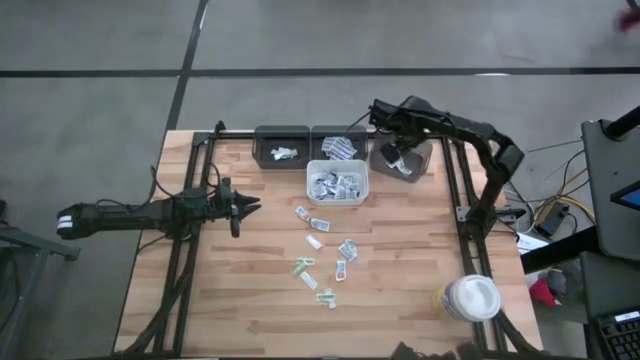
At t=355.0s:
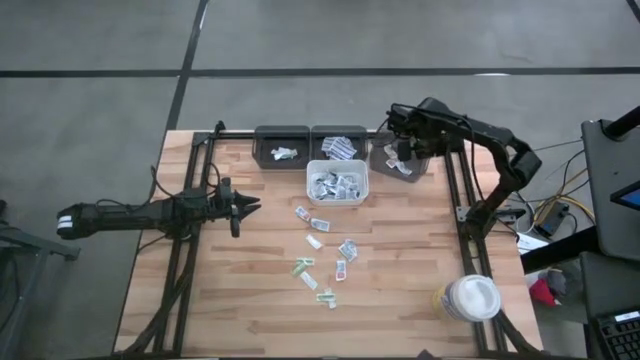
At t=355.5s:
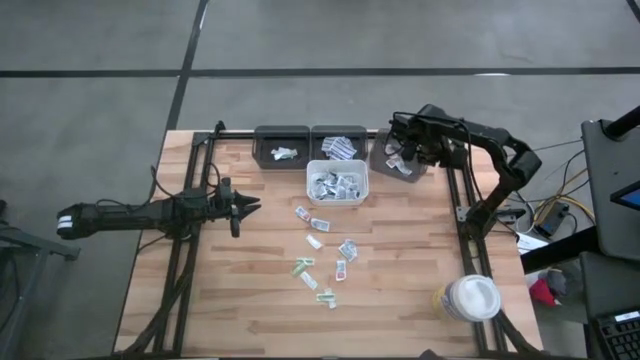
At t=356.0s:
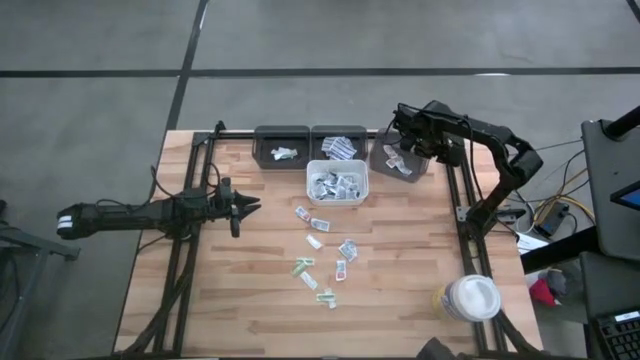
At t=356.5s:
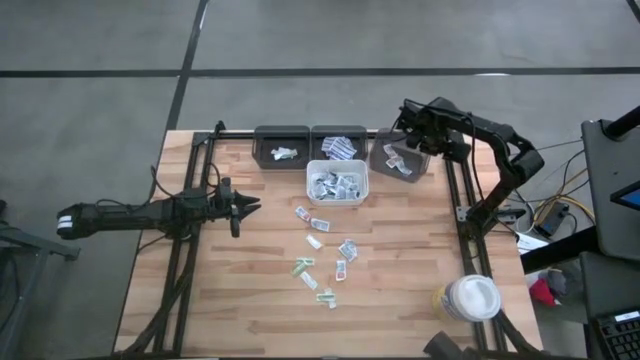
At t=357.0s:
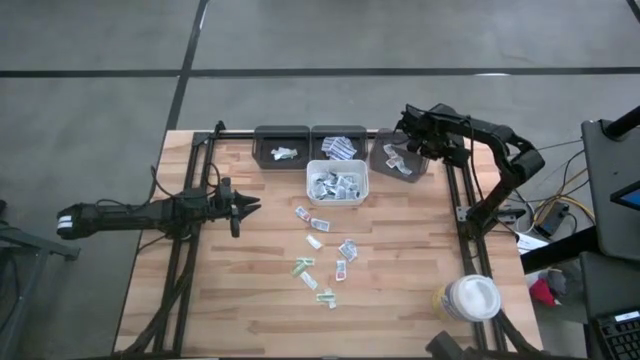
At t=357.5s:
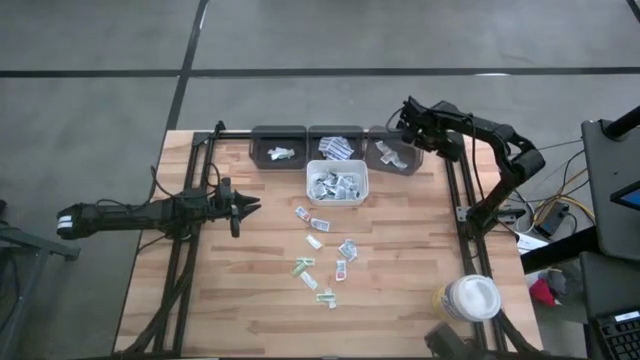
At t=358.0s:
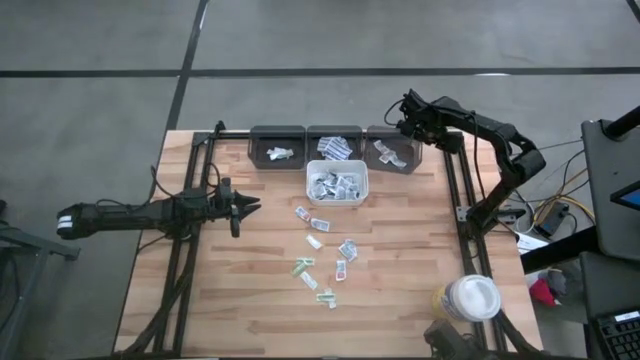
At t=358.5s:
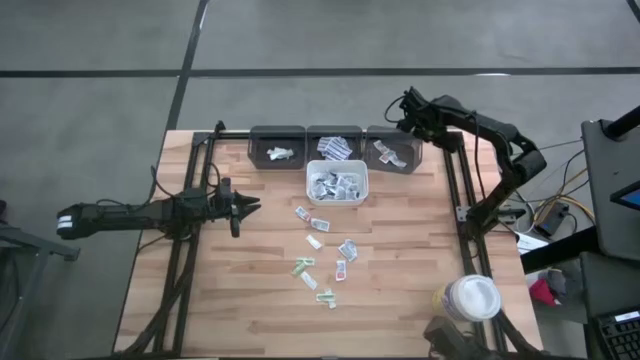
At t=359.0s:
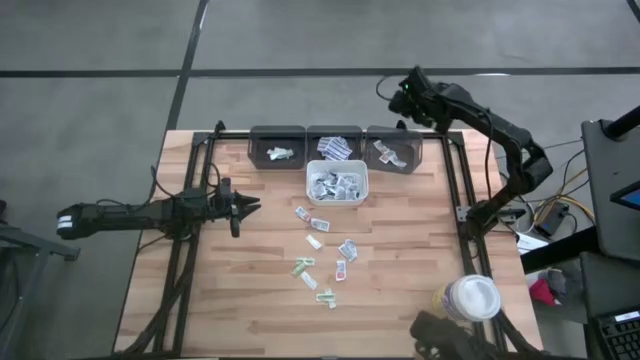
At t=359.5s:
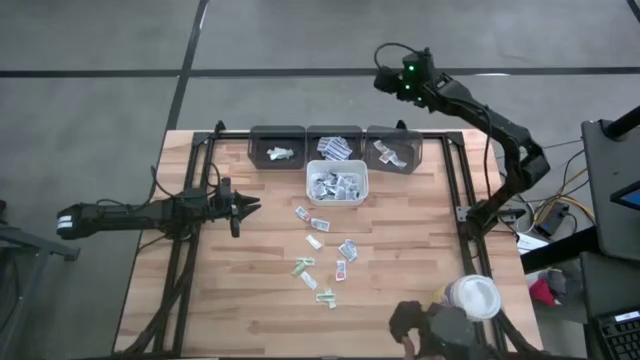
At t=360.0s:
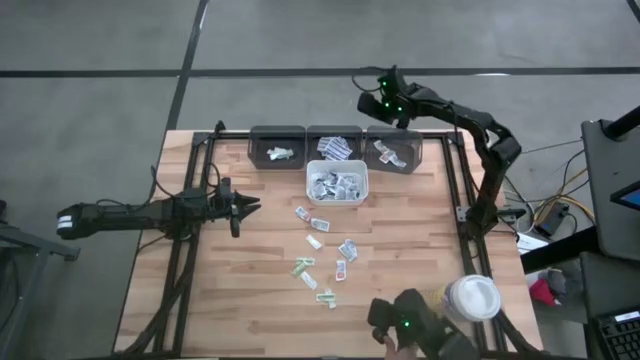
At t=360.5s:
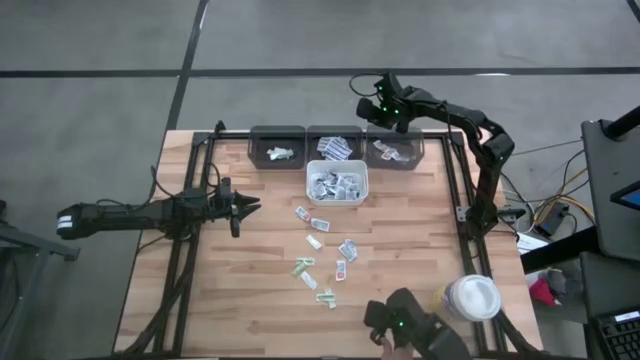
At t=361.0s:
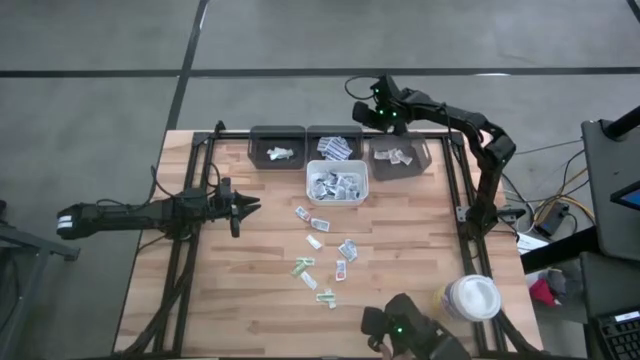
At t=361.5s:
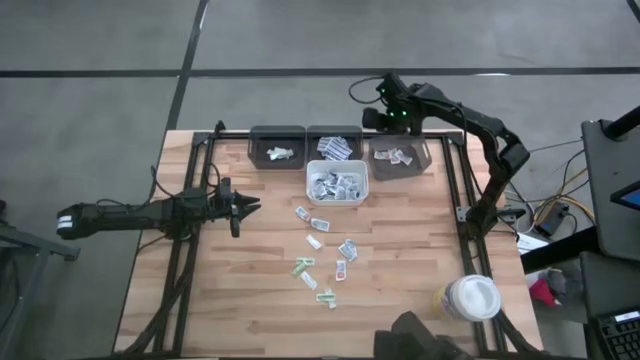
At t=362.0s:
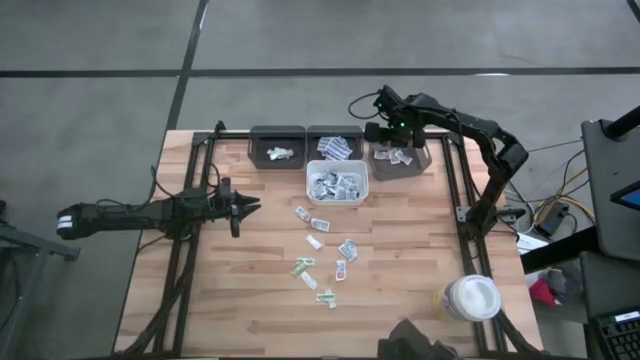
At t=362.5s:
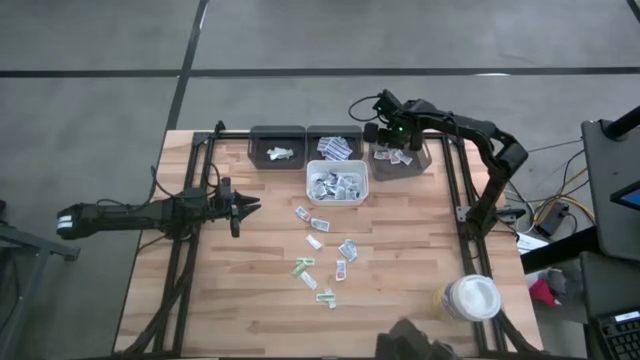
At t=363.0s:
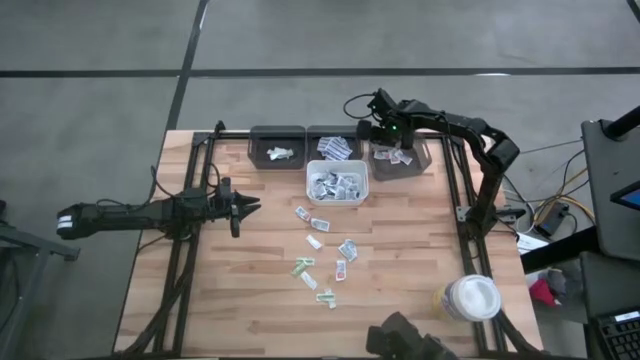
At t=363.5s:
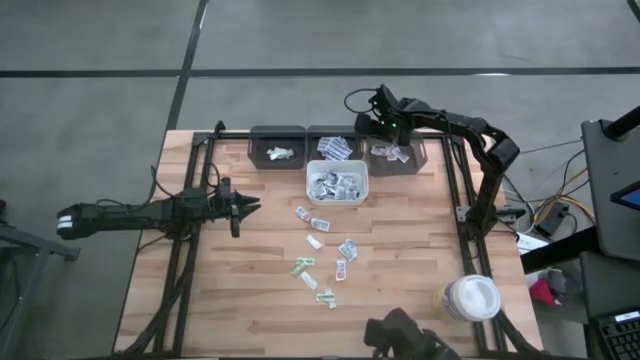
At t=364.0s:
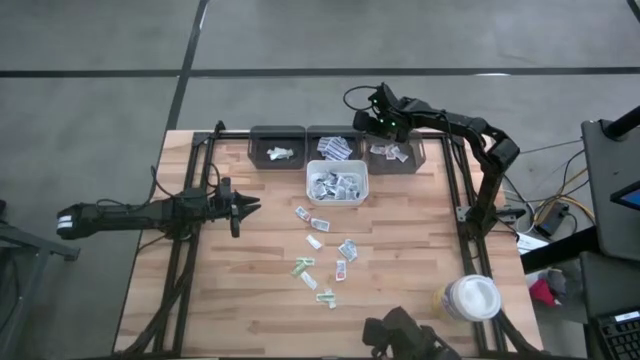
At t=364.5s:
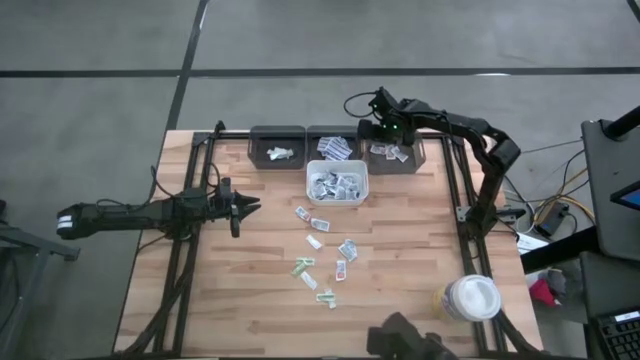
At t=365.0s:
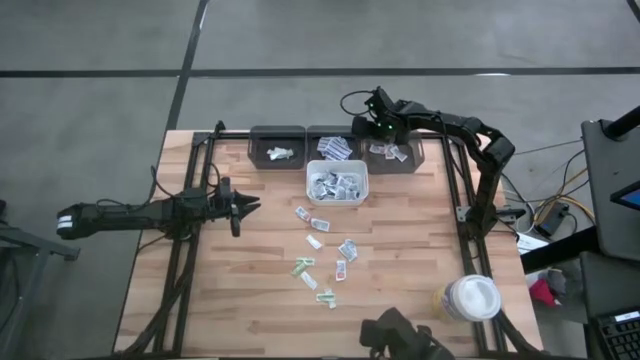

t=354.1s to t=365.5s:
Task: Pick & Place First Aid Supplies
Adjust the right black bin on the table

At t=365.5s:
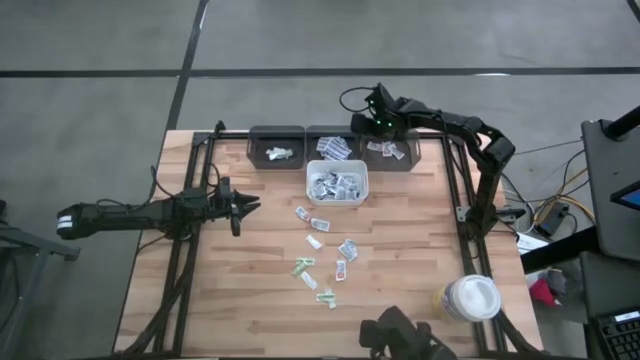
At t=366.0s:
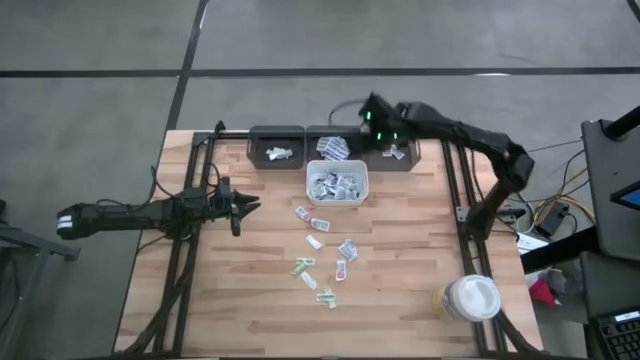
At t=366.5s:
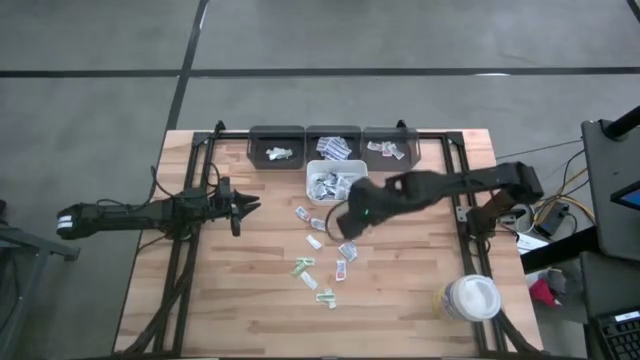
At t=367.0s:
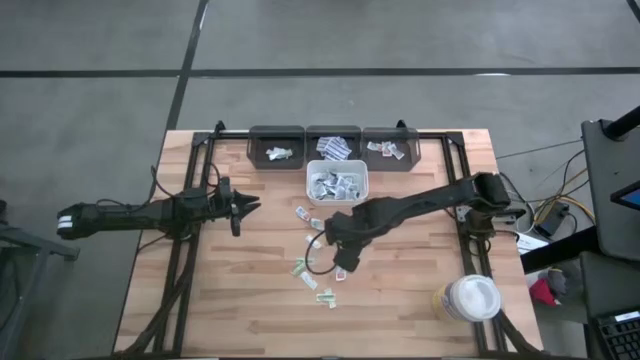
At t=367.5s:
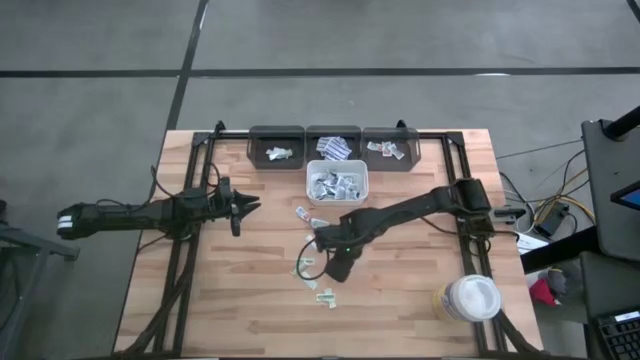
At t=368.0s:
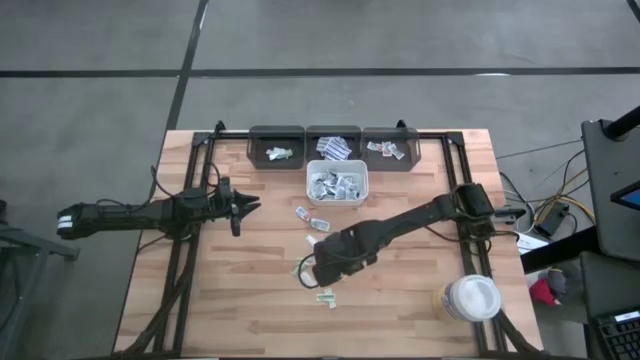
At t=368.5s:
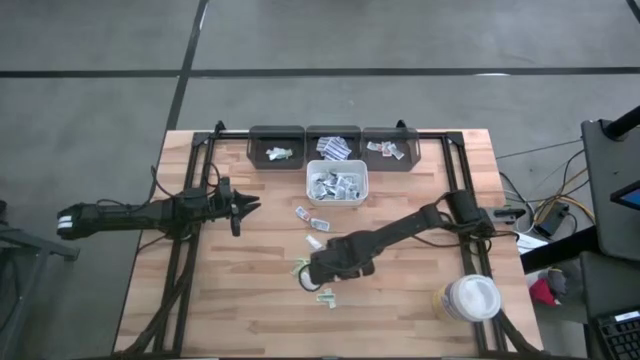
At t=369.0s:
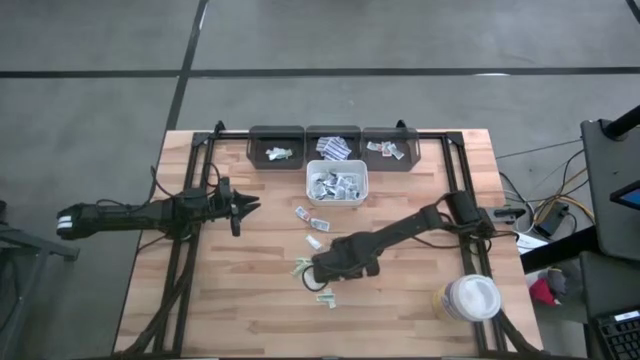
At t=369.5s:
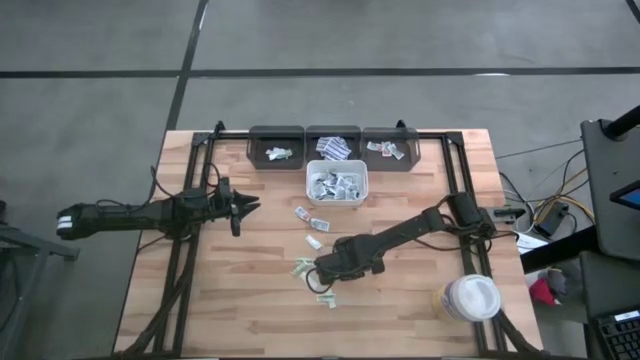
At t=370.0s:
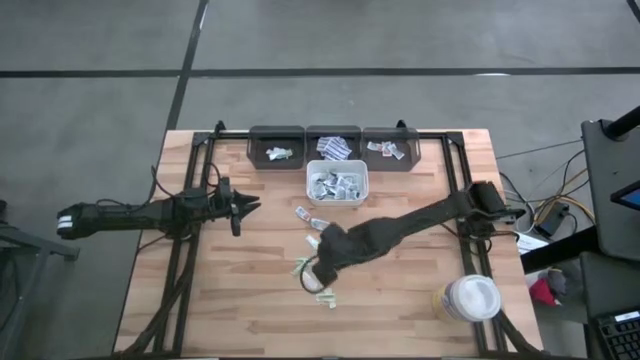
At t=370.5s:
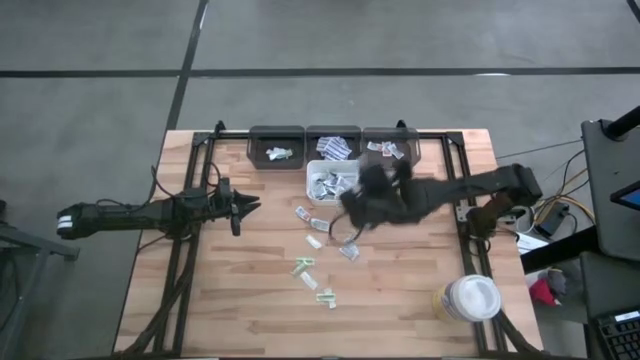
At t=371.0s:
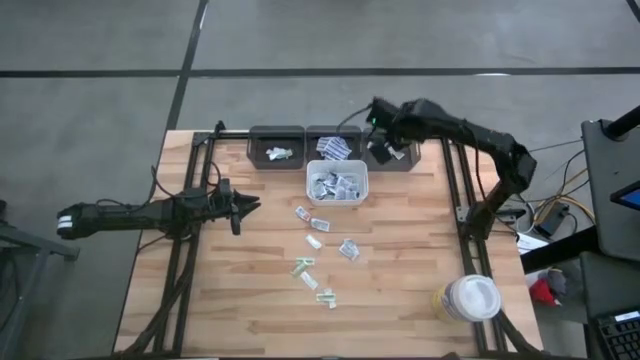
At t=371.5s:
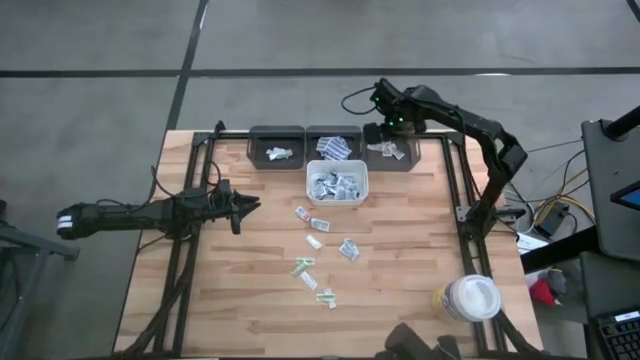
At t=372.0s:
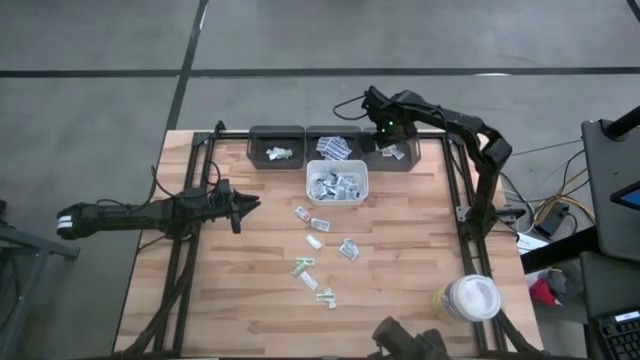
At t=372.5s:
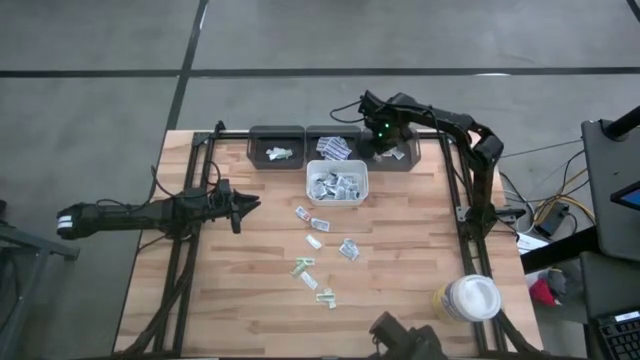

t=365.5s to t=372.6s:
Put the orange ointment pack into the right black bin

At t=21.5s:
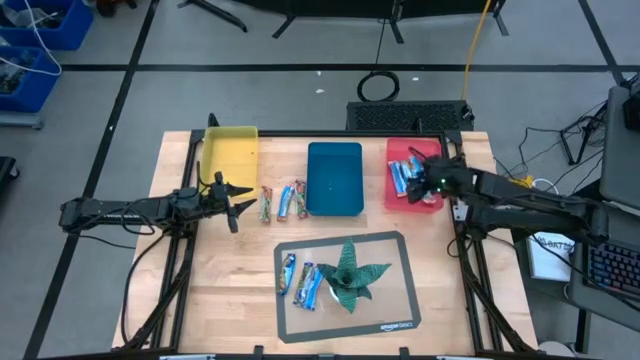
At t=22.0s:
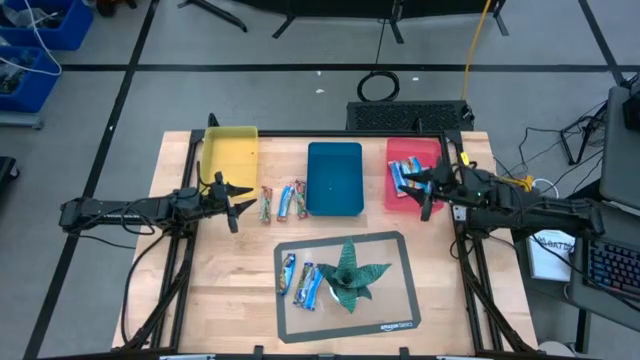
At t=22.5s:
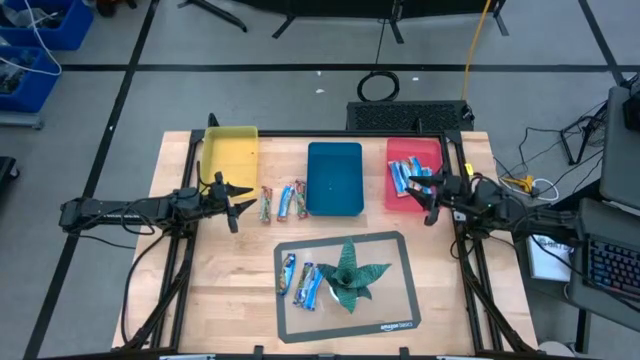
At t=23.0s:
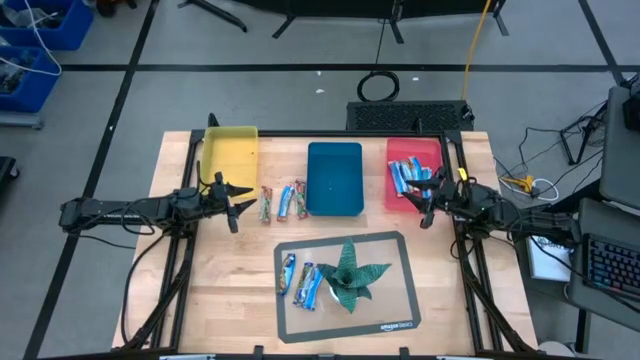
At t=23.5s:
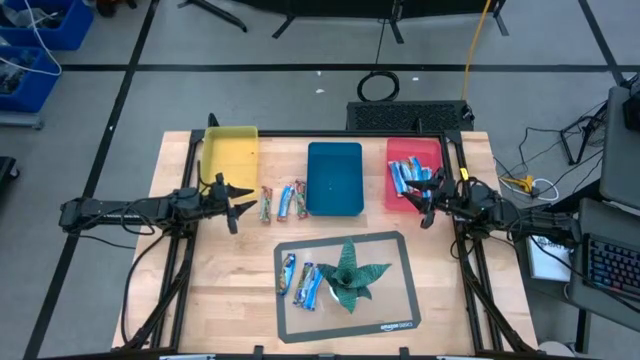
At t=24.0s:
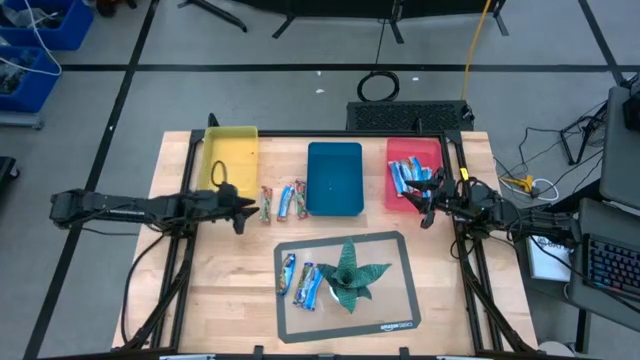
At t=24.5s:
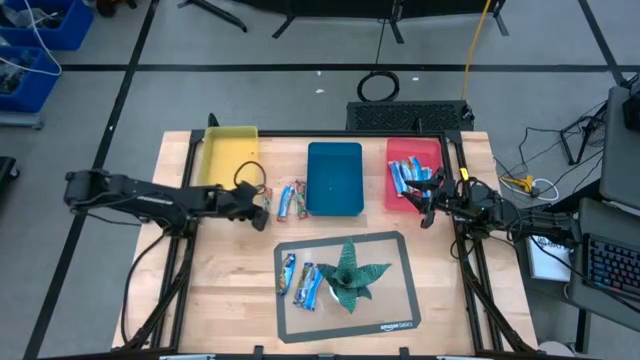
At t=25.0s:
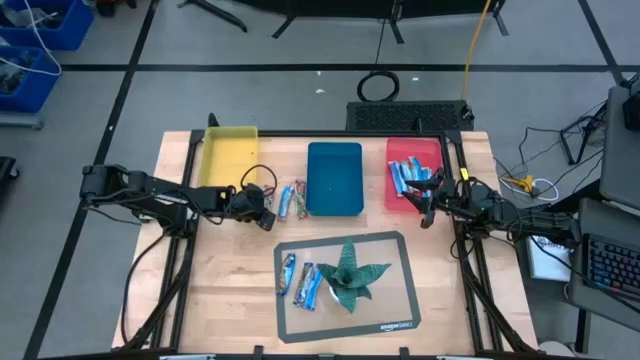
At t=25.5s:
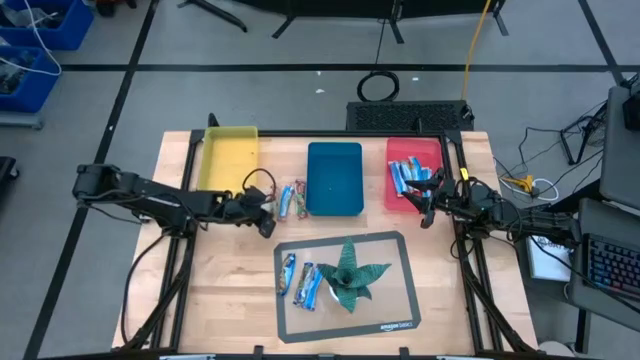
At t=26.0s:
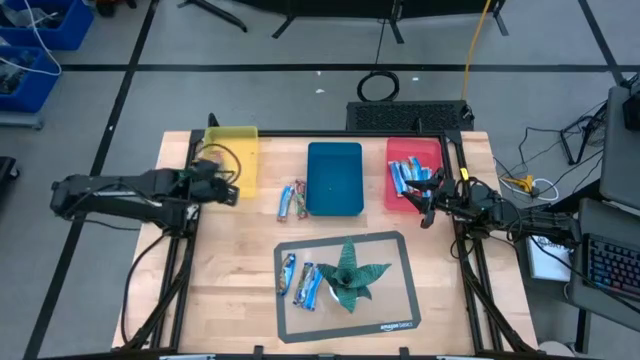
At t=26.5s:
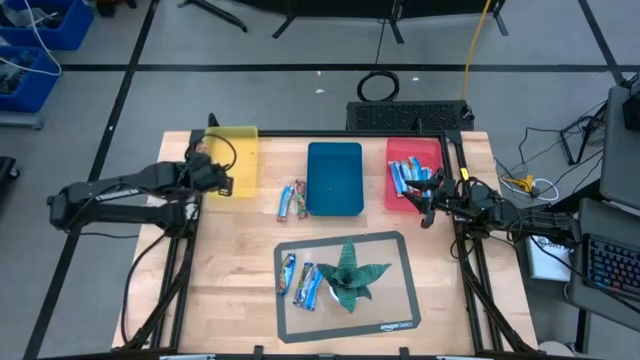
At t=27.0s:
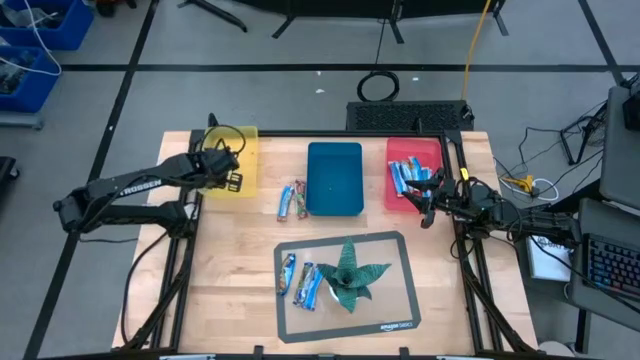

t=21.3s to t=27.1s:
Task: Pick and place Granola Bars by type
Put the red granola bar into the yellow bin
